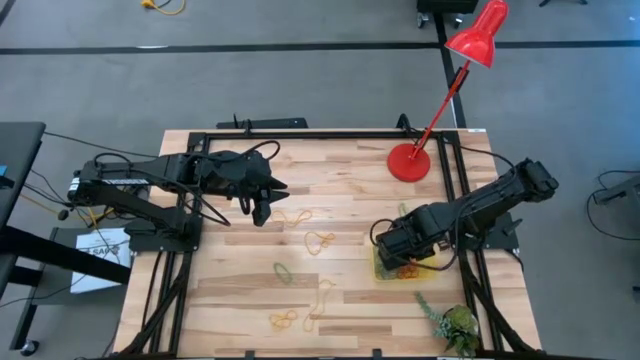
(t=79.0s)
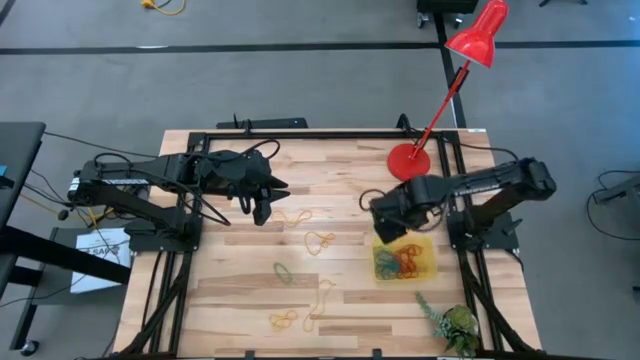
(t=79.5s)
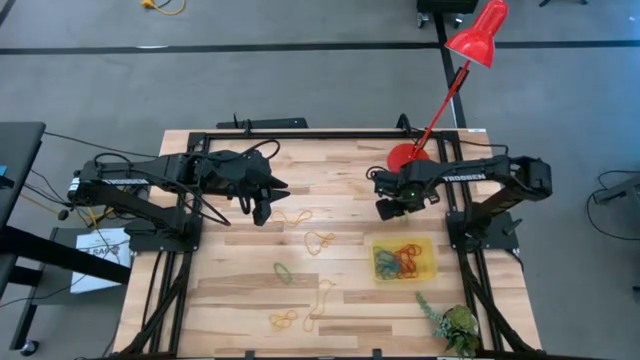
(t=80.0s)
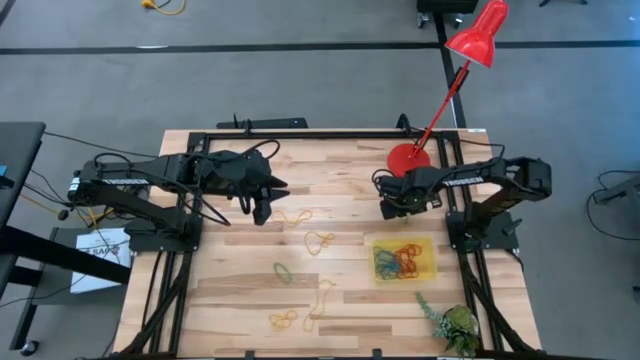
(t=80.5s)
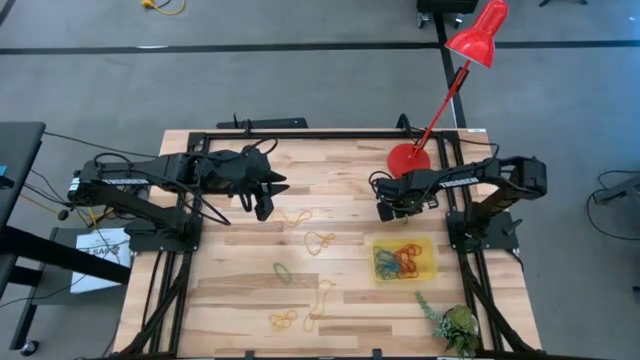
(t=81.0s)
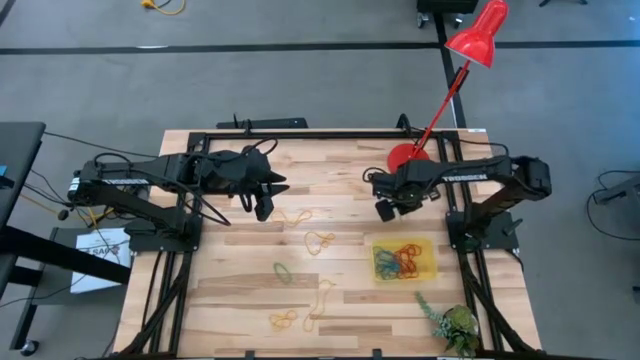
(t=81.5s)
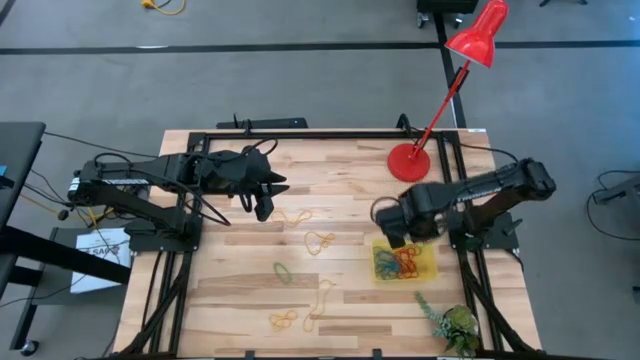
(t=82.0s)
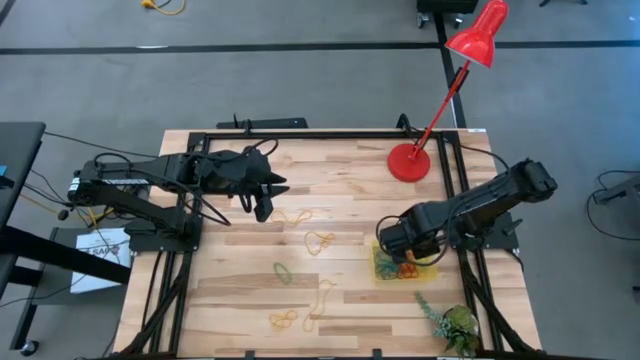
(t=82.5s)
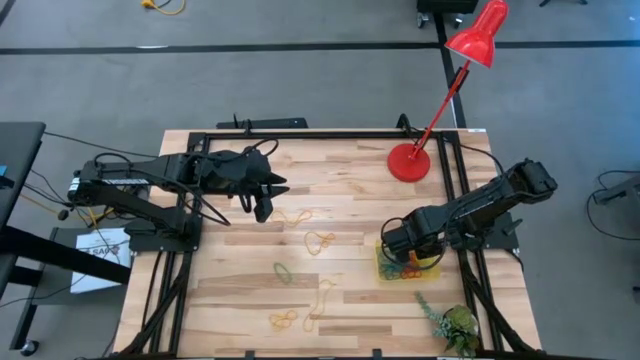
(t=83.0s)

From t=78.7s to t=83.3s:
Task: Pick and place items into bin
Put the green rubber band into the yellow bin

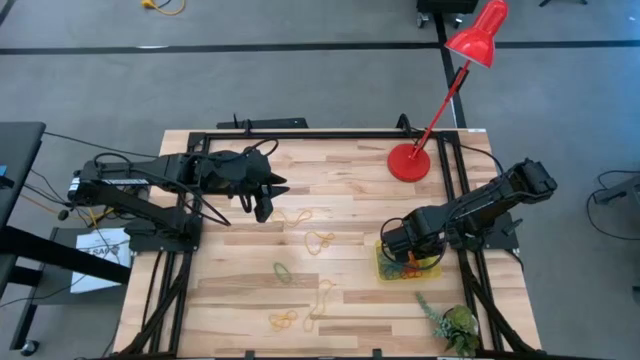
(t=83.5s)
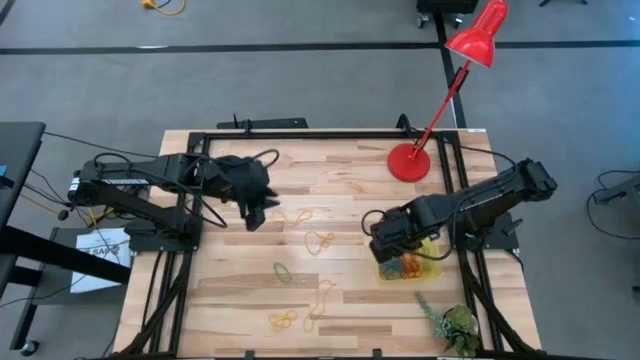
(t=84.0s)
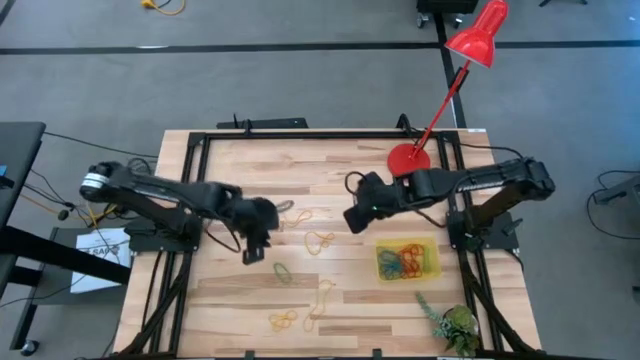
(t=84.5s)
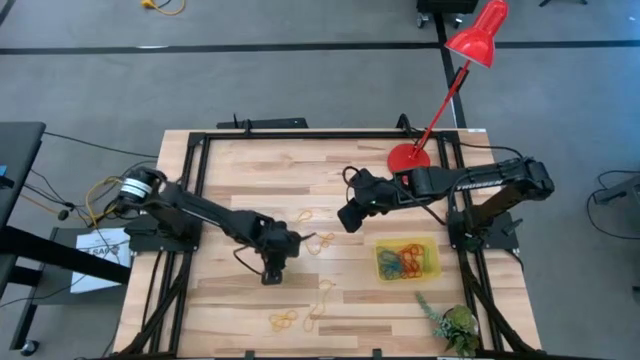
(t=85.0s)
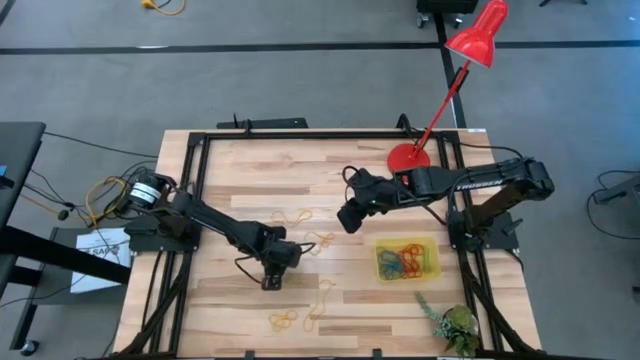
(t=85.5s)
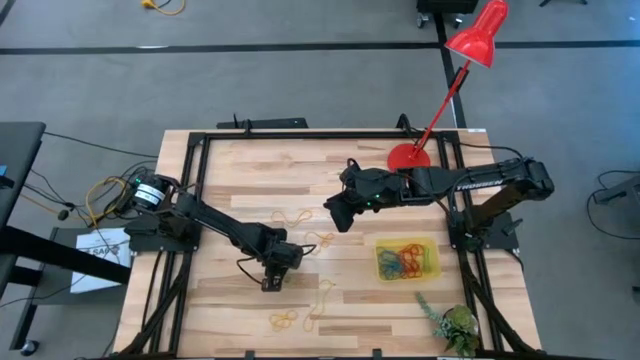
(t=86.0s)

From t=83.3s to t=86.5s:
Put the green rubber band into the yellow bin

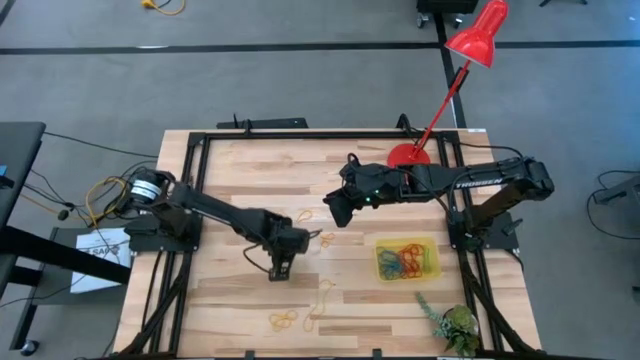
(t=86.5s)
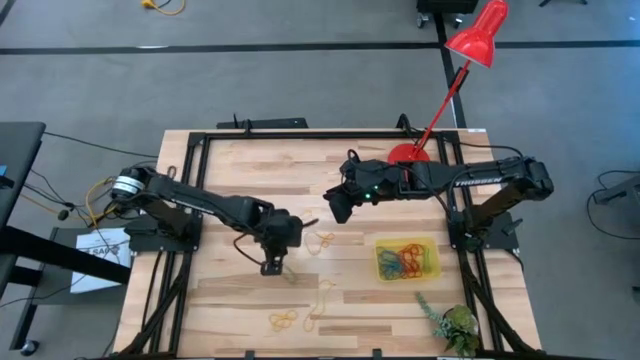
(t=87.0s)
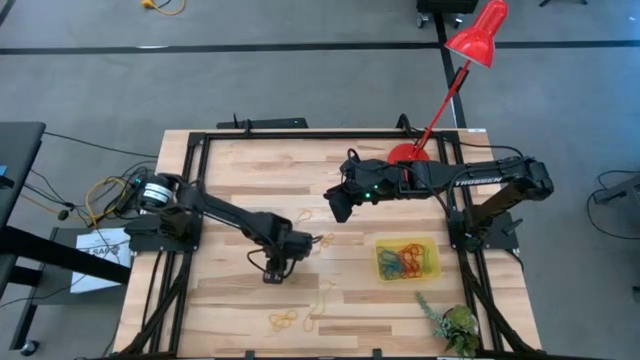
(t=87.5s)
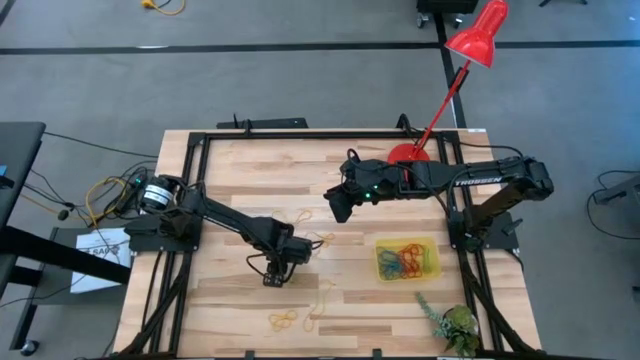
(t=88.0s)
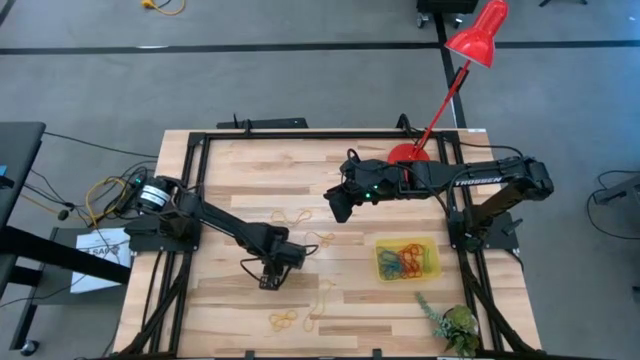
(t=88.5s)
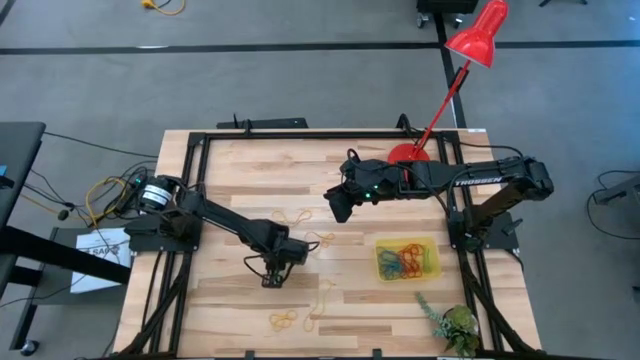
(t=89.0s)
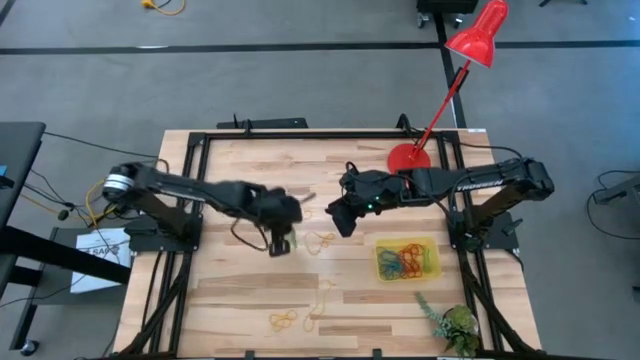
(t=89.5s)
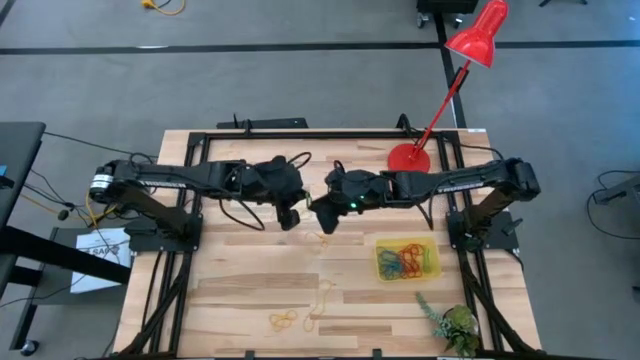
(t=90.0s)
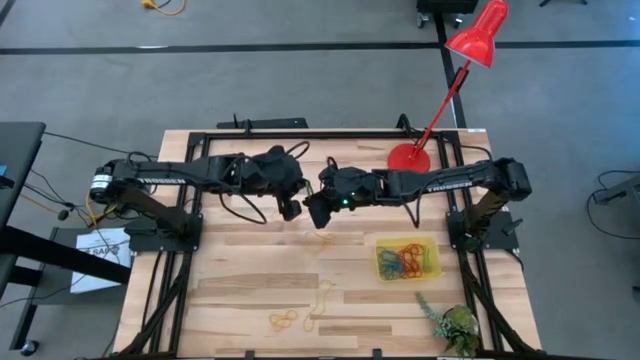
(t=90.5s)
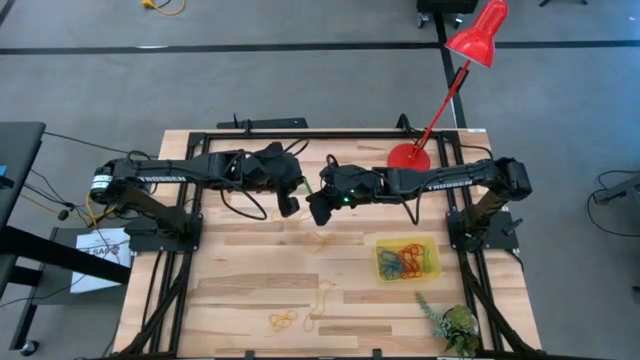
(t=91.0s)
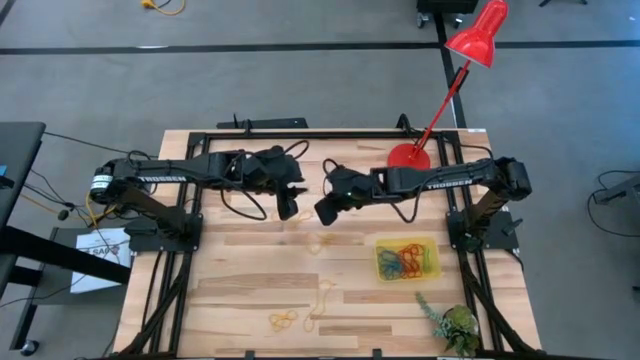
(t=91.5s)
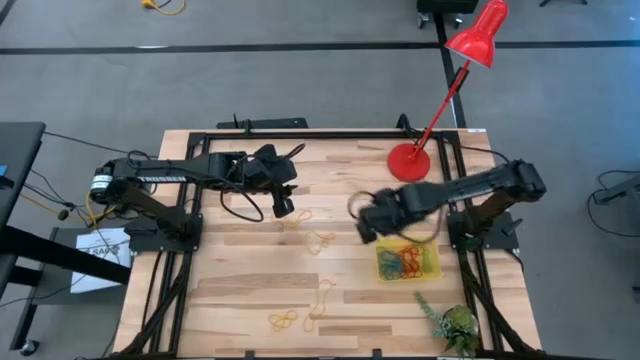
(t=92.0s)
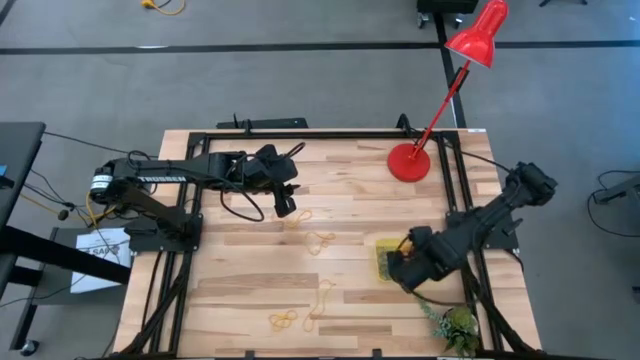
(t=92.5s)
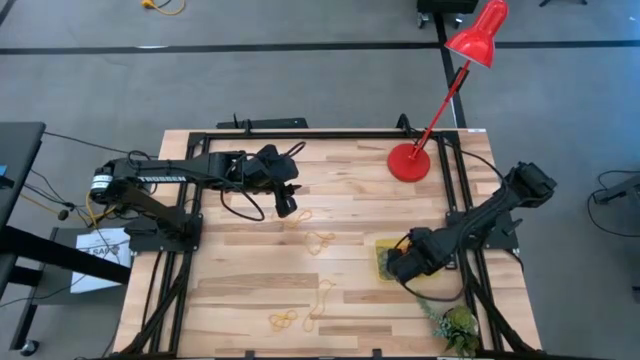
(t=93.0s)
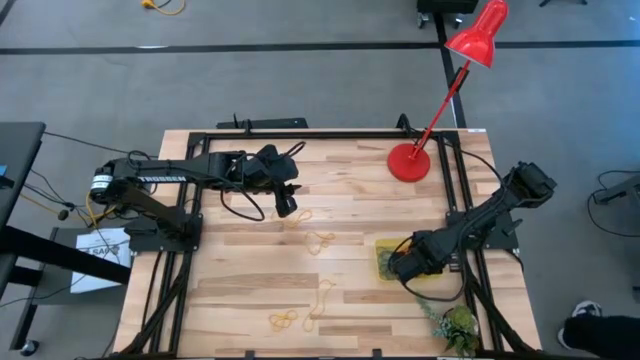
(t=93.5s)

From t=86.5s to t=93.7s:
Put the green rubber band into the yellow bin

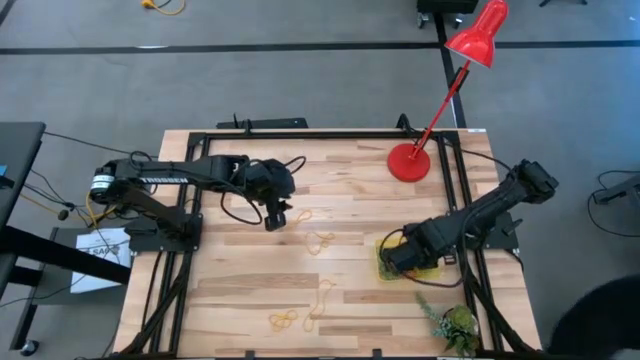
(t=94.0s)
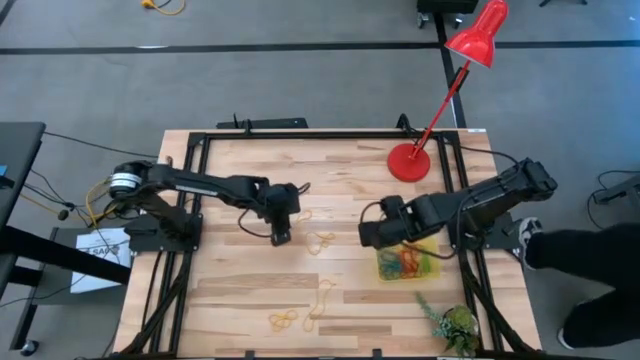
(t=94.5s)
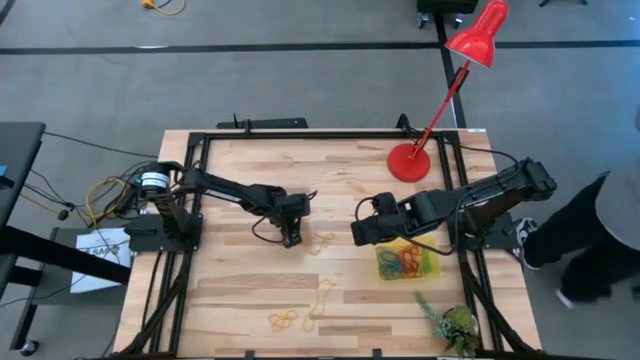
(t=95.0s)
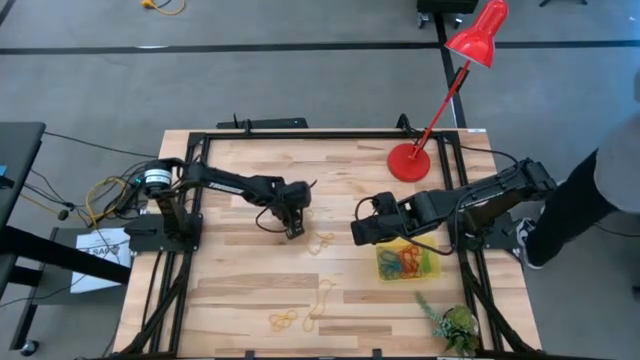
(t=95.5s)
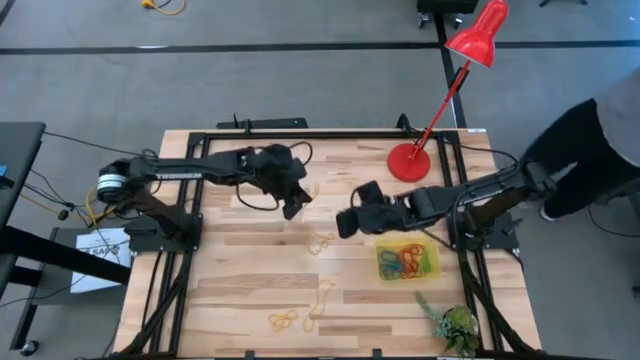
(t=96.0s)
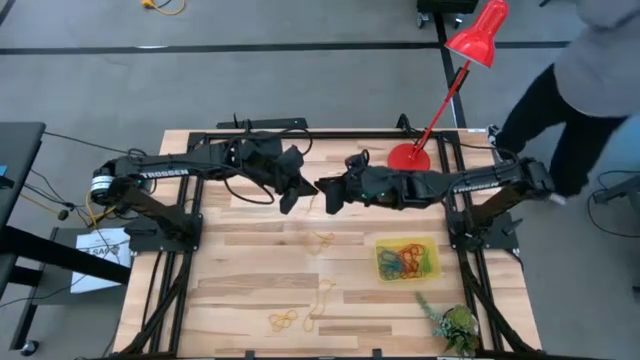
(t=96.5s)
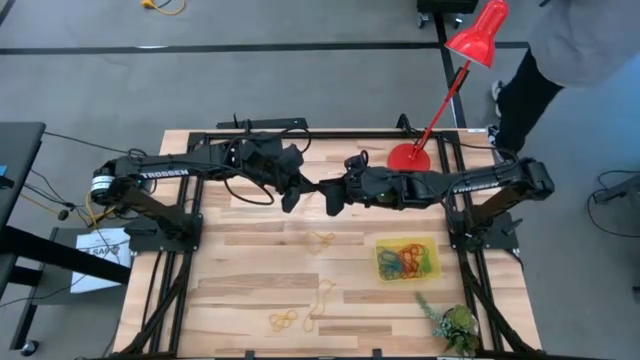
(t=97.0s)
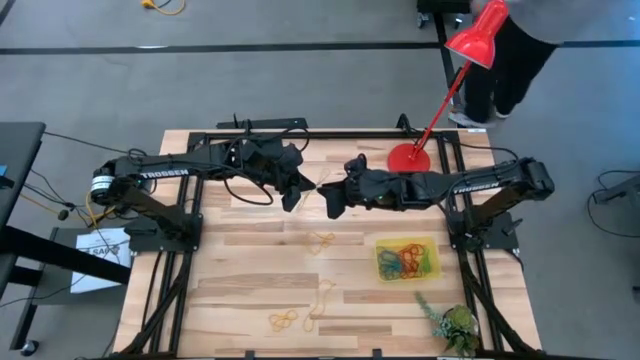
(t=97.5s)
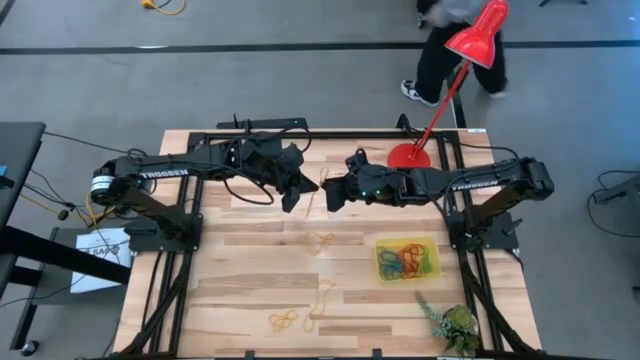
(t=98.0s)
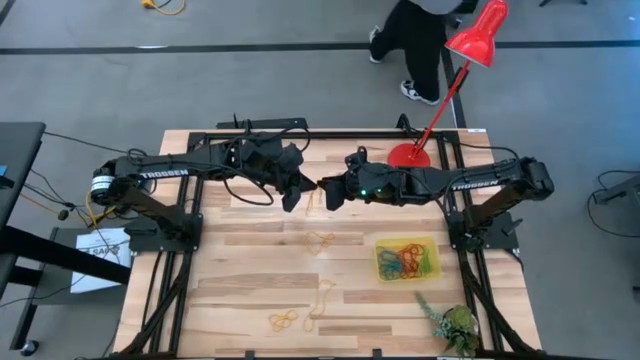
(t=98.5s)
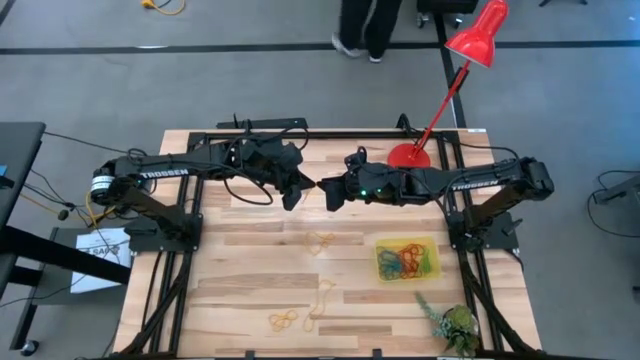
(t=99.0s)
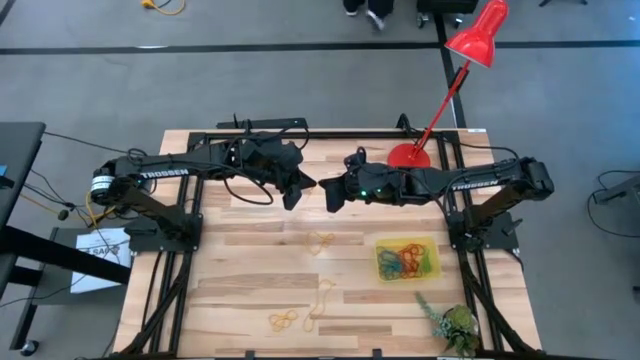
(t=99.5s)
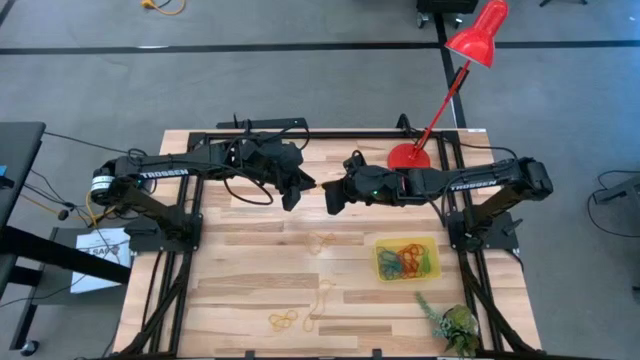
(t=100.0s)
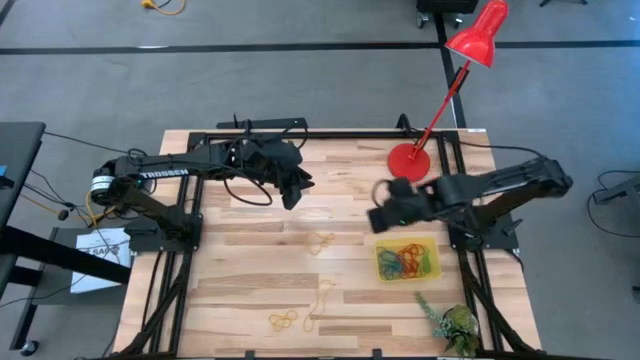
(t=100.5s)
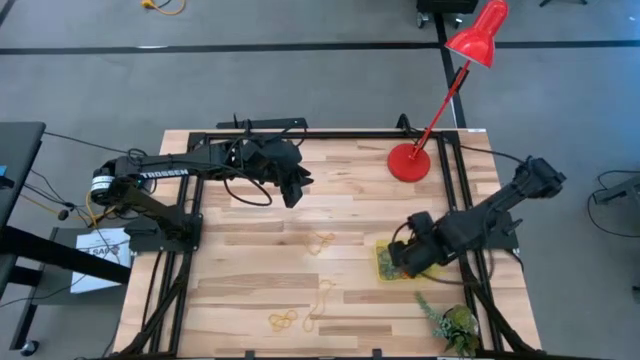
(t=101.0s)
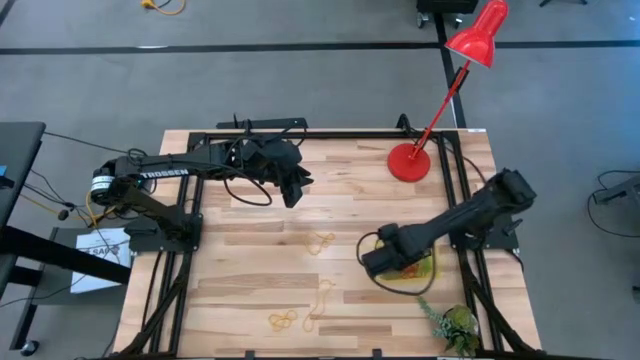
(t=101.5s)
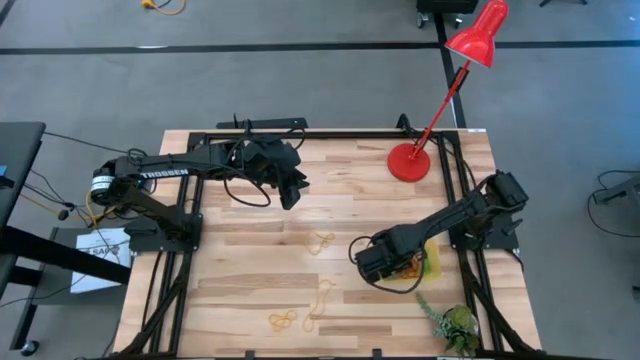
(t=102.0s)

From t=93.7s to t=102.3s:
Put the yellow rubber band into the yellow bin
